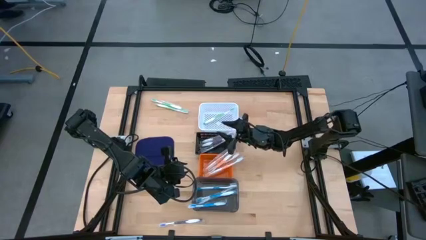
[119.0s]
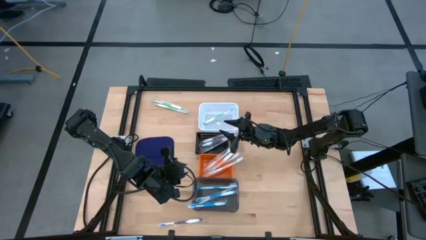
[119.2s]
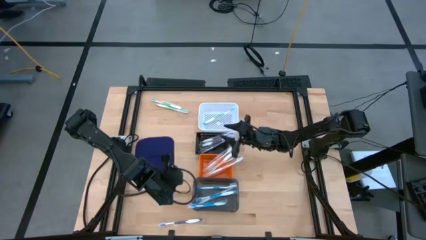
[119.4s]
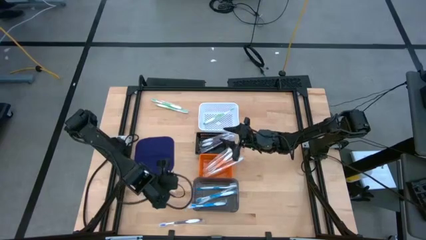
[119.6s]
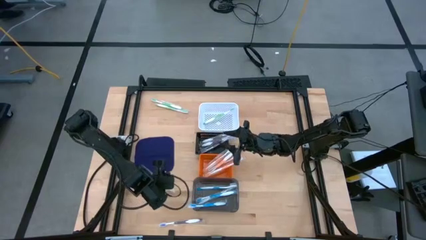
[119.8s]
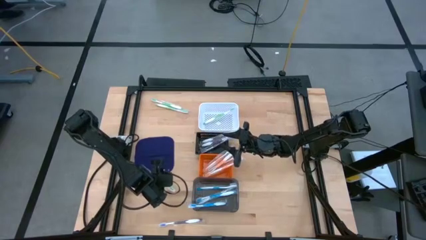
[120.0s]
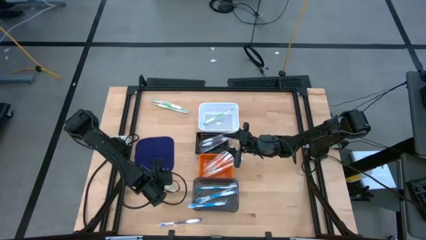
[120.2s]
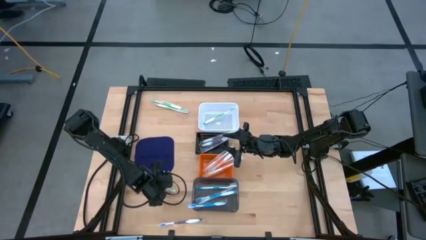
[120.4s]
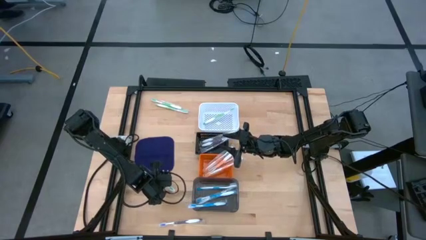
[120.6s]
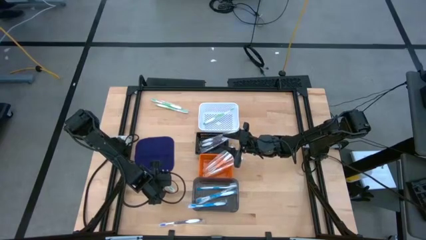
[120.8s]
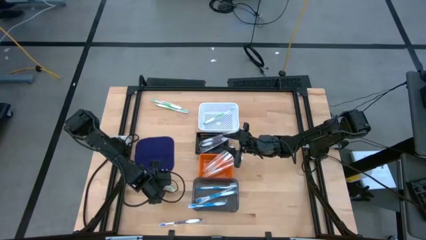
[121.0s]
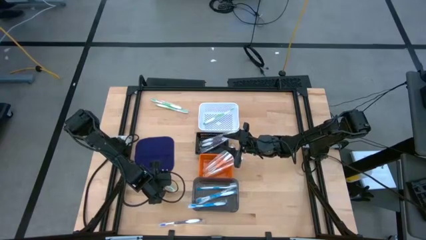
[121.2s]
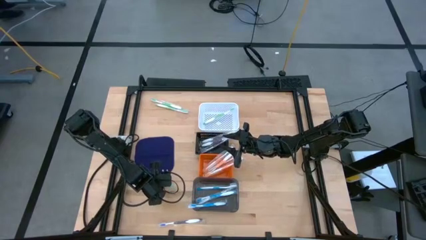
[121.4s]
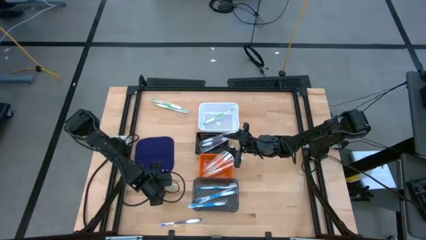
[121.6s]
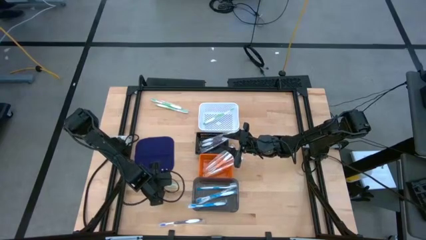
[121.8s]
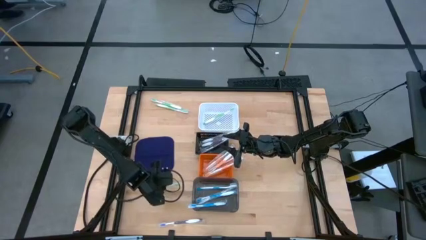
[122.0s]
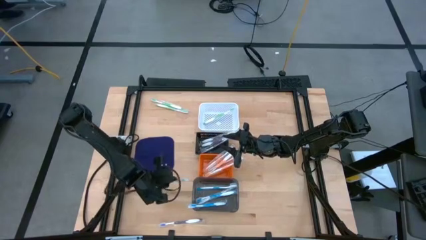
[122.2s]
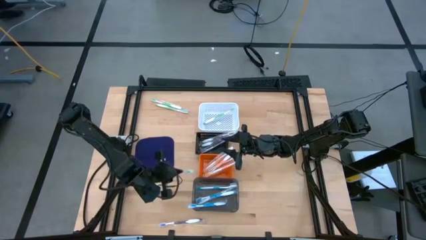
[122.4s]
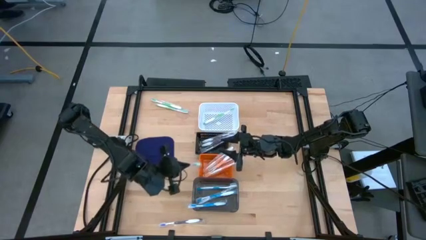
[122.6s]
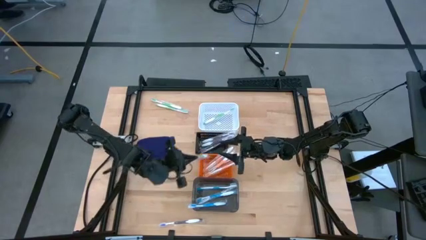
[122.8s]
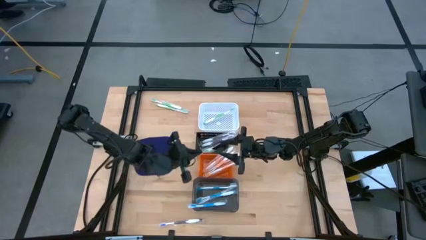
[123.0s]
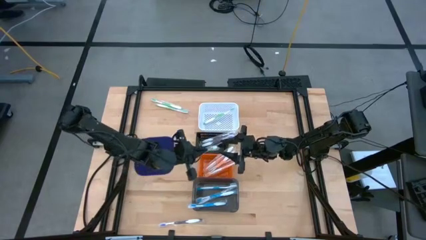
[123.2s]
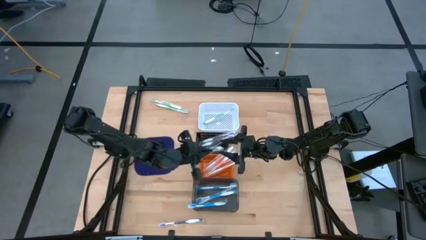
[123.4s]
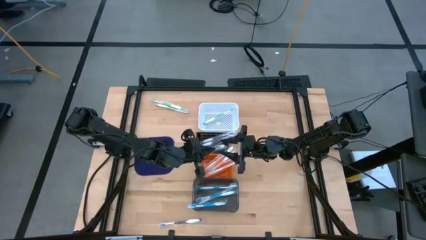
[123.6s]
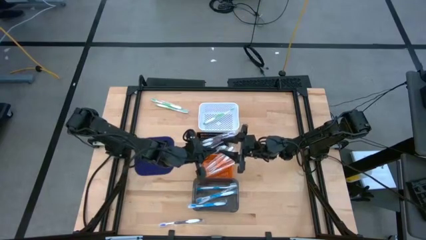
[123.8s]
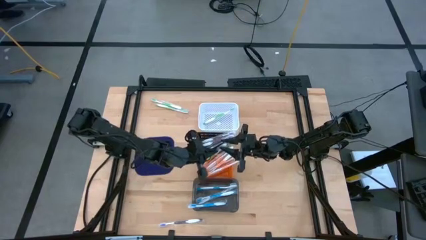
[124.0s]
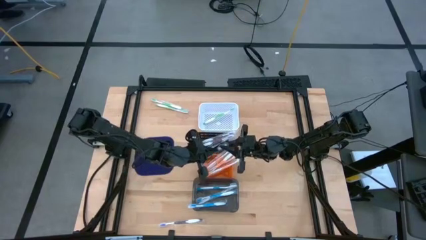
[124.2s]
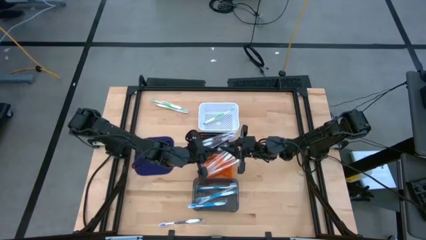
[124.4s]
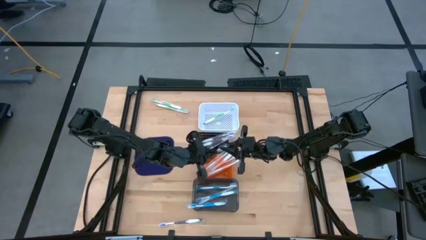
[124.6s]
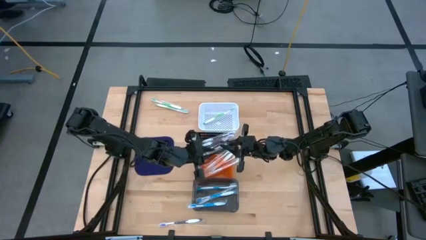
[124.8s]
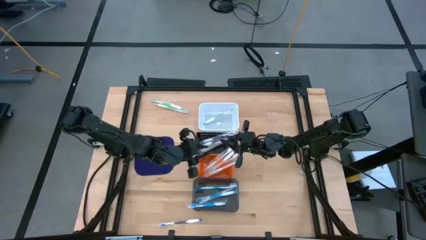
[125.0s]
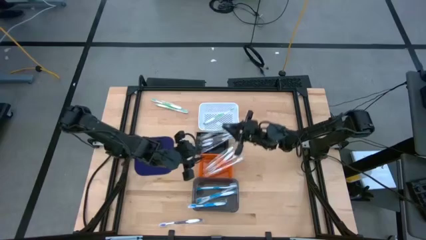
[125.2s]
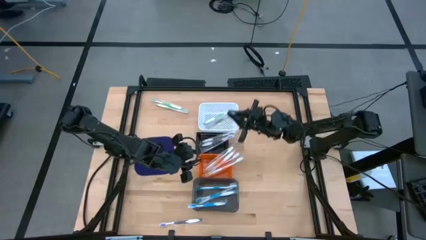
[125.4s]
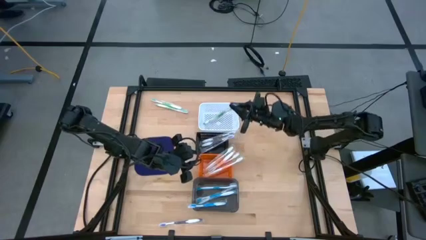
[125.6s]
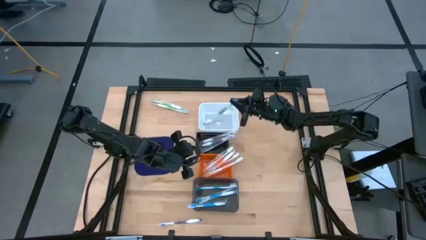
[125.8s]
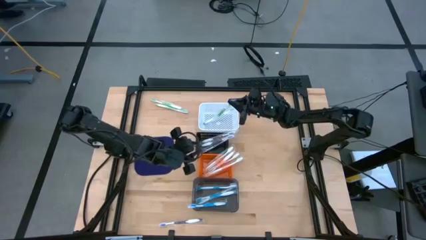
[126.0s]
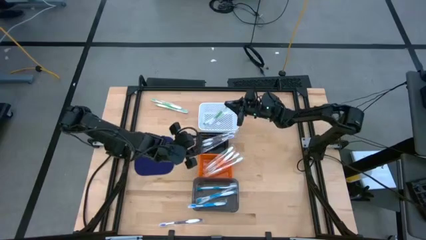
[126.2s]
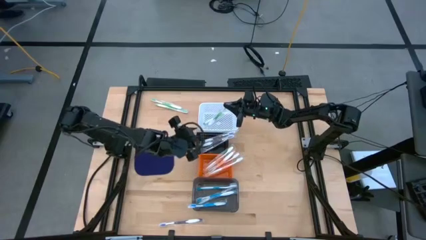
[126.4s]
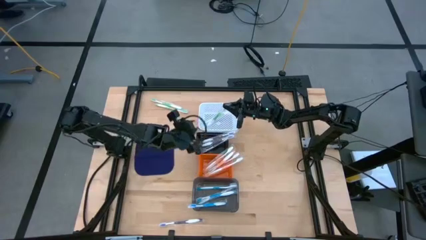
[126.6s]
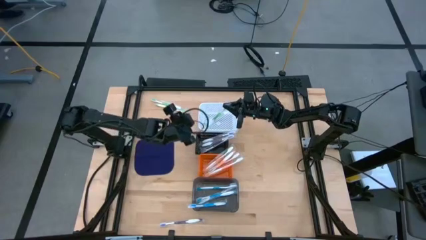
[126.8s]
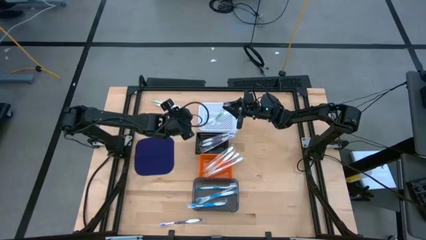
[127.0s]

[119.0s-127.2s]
Task: Pick & Place Toothbrushes
Put the bottom green toothbrush into the white bin

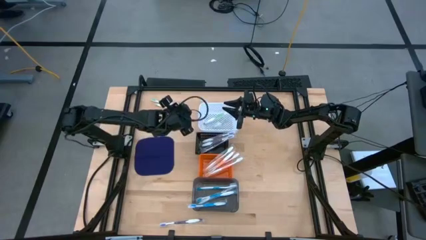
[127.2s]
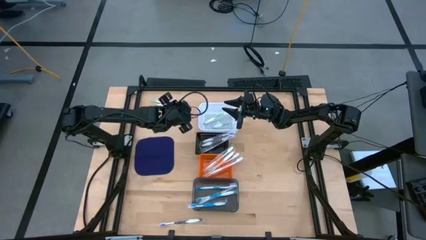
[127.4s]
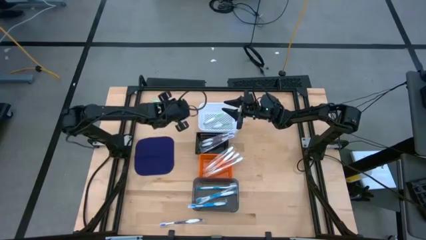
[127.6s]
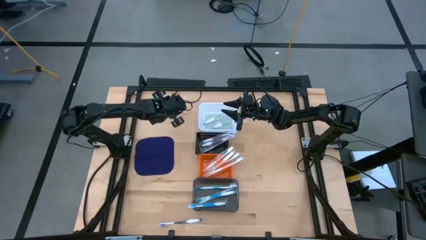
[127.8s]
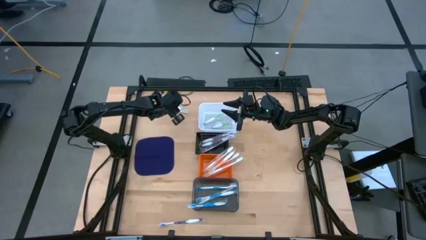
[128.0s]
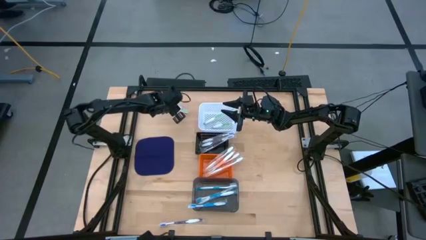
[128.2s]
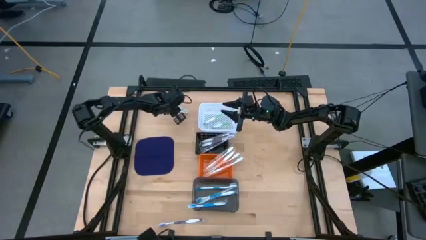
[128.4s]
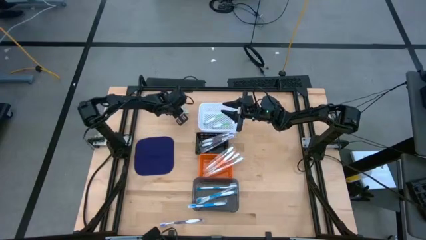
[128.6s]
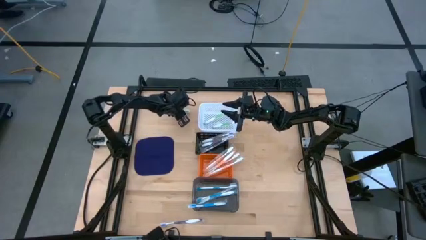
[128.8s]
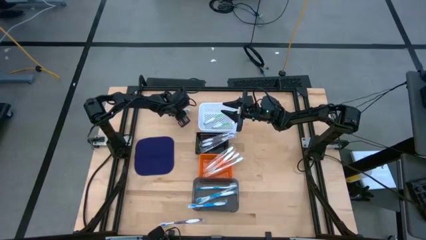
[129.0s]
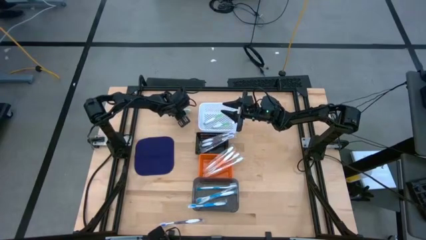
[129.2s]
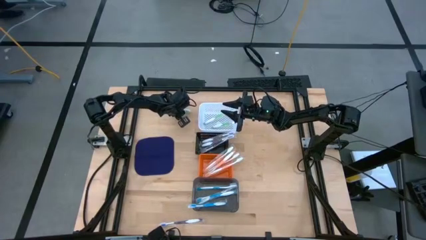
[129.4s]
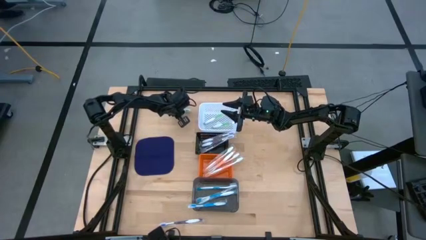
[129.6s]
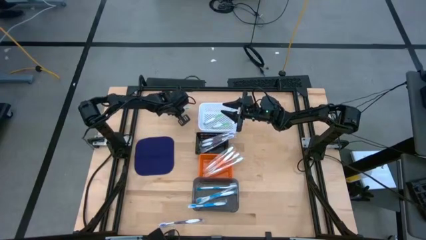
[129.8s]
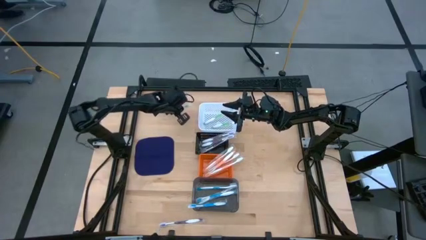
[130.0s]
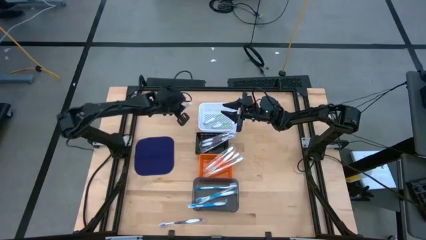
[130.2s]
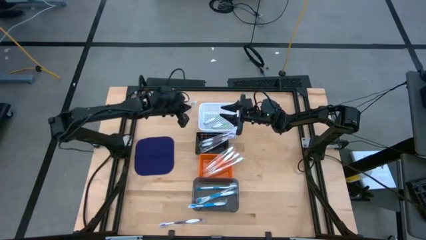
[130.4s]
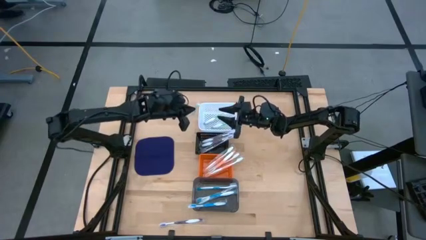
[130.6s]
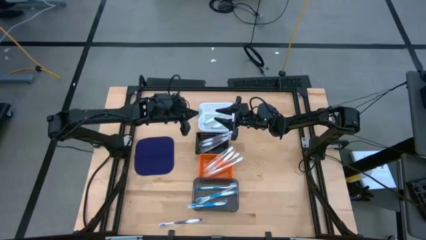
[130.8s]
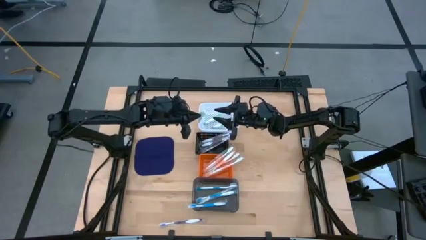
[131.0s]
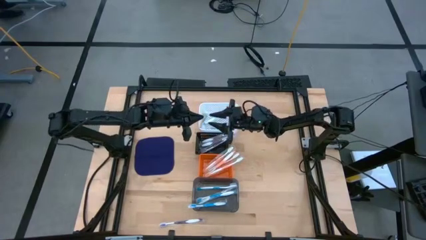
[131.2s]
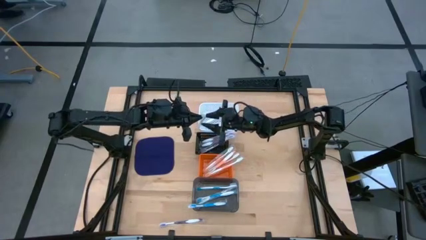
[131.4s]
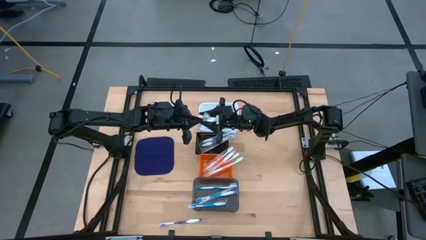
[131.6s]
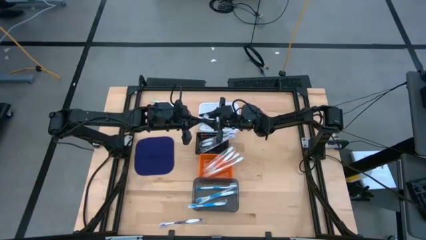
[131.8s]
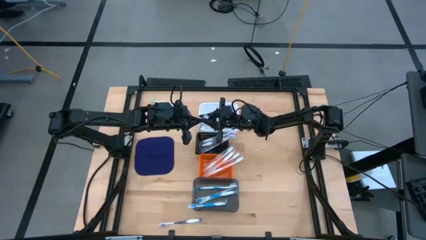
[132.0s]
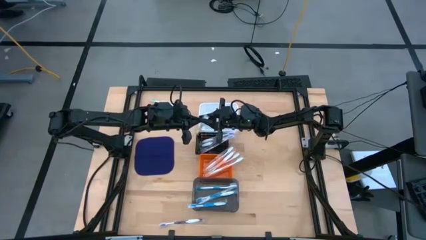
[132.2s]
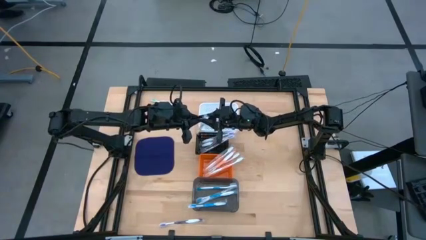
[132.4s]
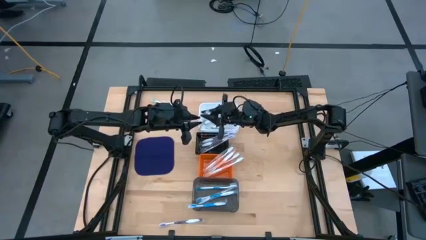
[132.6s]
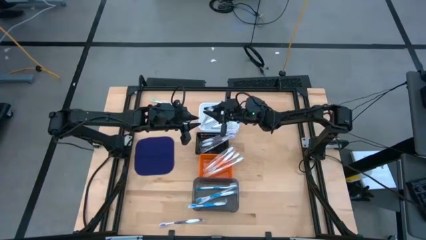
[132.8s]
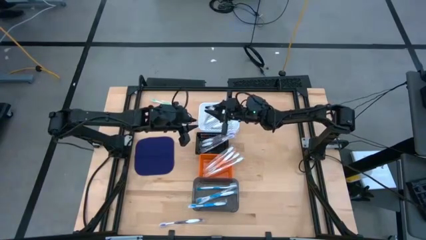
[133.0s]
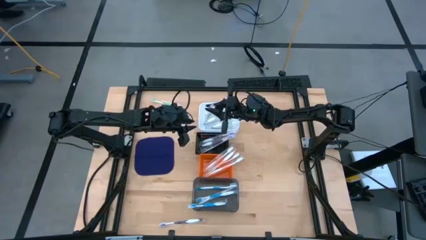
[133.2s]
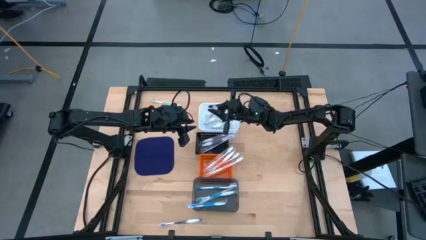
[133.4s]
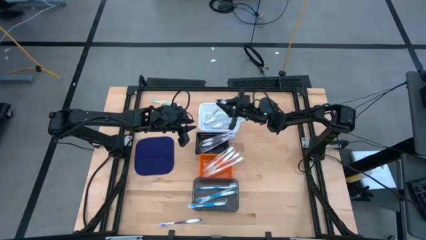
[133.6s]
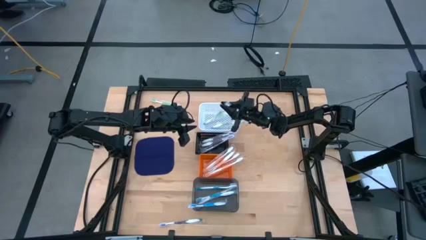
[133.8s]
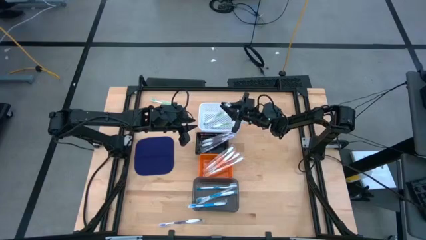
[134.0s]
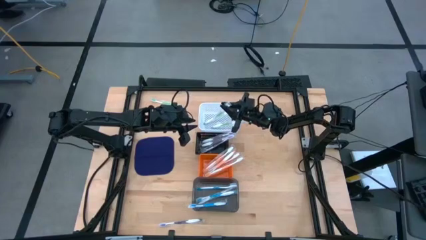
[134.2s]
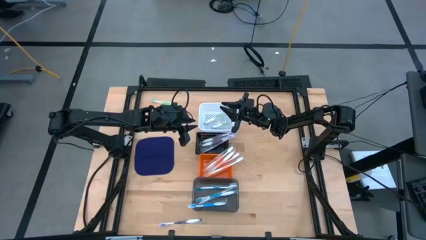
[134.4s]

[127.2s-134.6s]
Put the bottom green toothbrush into the white bin

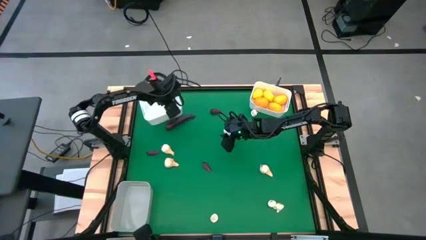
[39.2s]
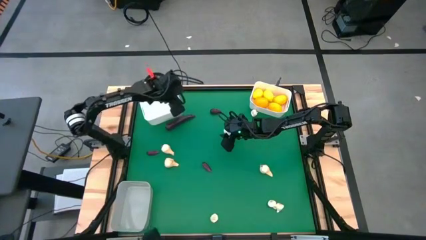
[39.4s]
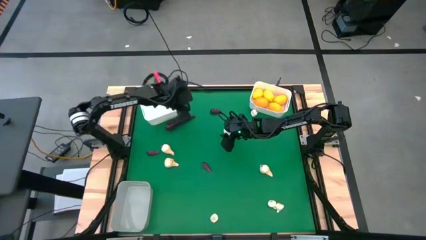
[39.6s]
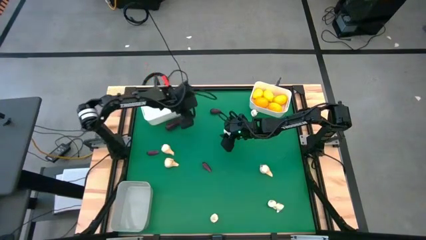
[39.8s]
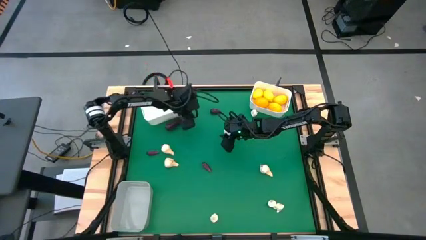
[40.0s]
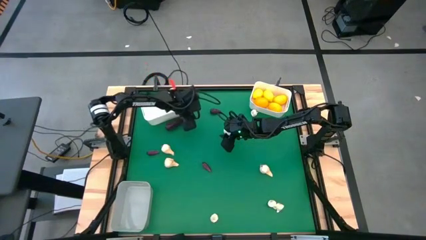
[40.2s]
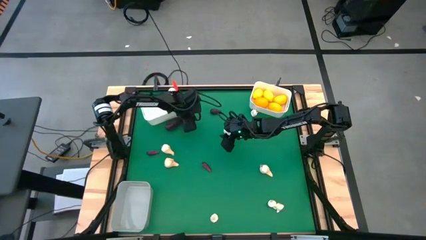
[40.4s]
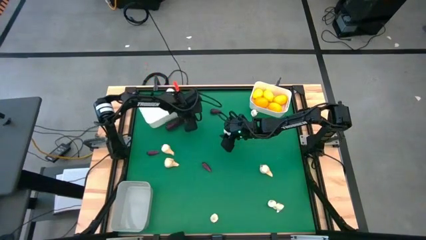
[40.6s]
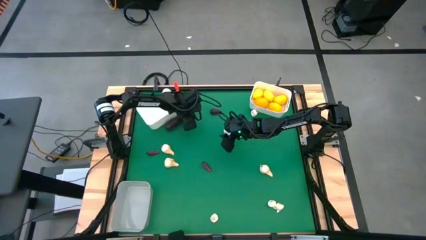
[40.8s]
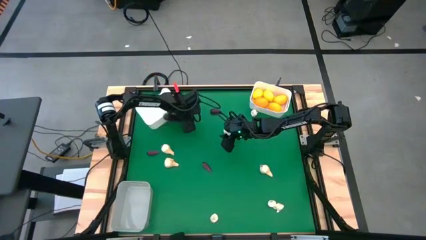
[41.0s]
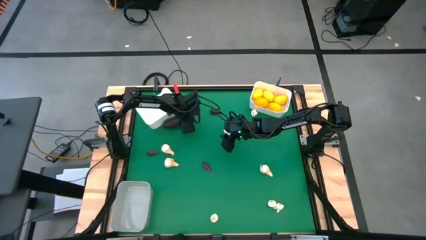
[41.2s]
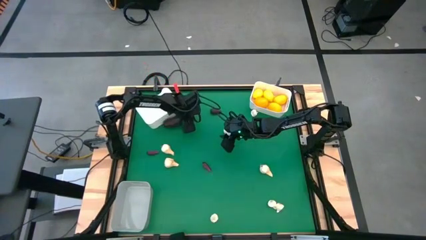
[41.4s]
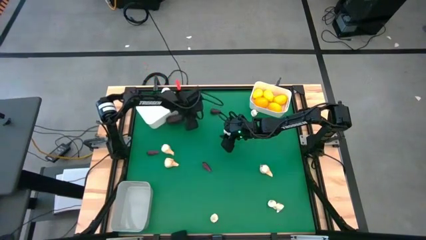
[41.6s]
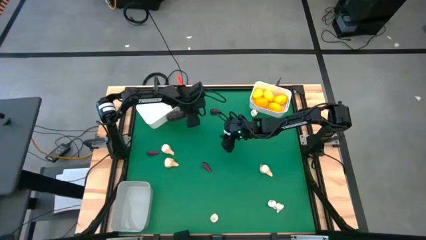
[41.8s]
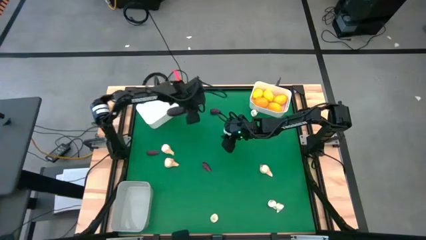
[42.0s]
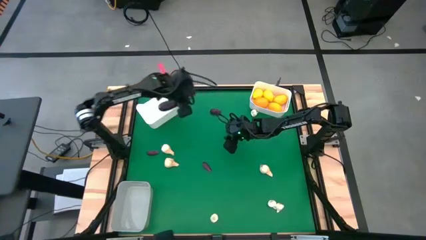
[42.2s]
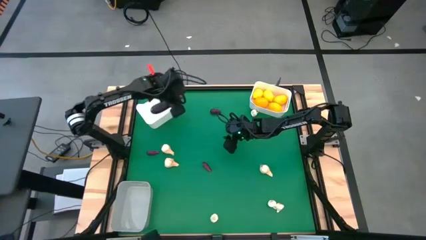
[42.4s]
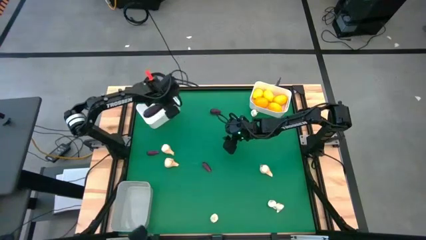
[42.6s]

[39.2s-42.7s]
Task: Sort produce into baskets
Put the top left violet eggplant into the left white bin
